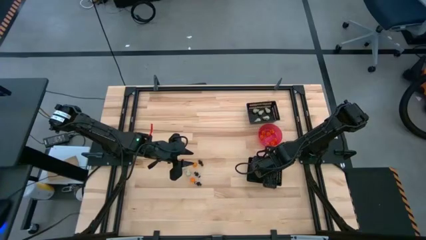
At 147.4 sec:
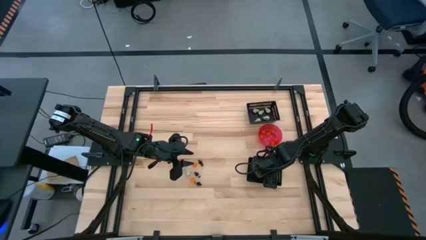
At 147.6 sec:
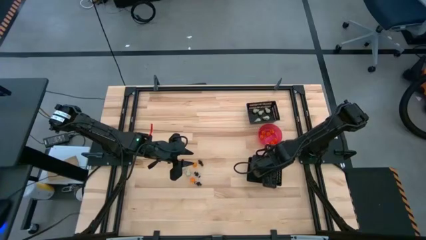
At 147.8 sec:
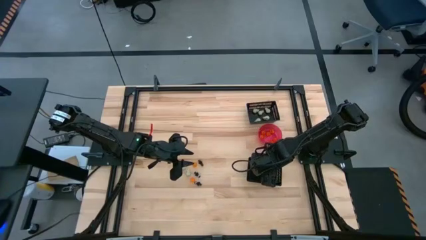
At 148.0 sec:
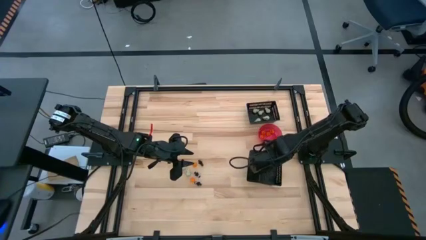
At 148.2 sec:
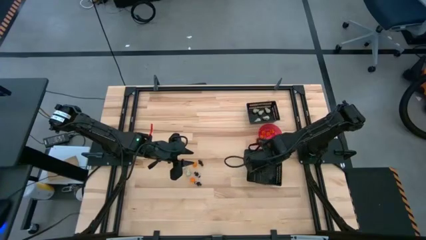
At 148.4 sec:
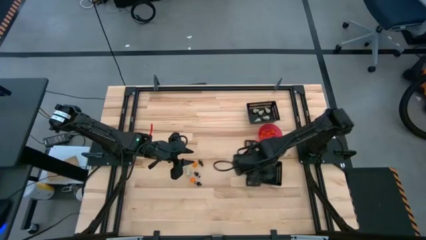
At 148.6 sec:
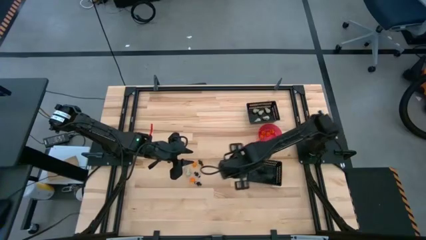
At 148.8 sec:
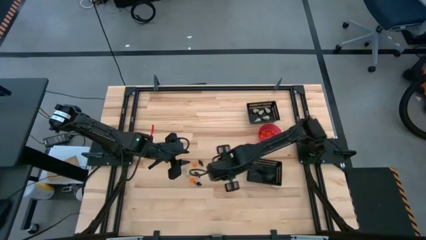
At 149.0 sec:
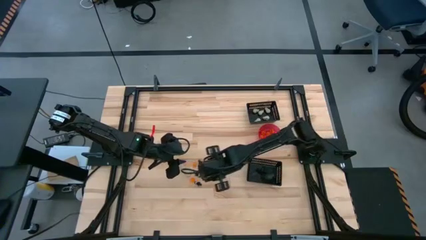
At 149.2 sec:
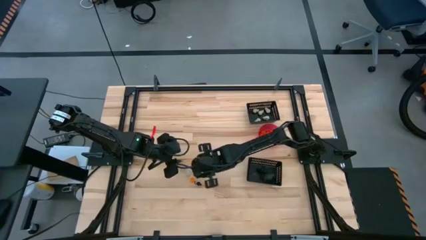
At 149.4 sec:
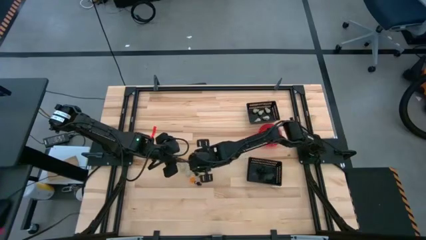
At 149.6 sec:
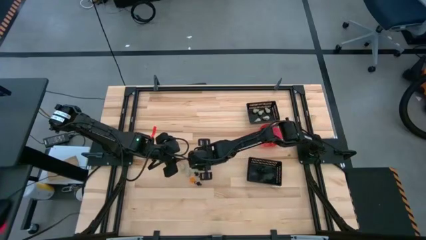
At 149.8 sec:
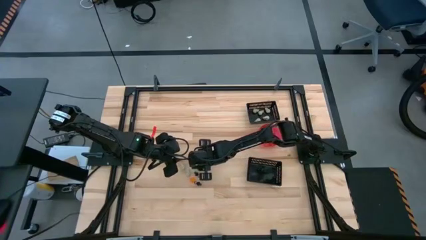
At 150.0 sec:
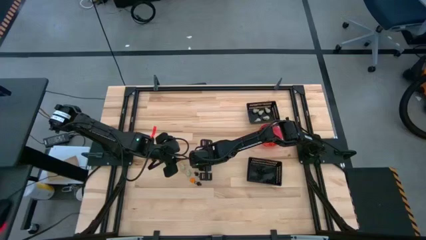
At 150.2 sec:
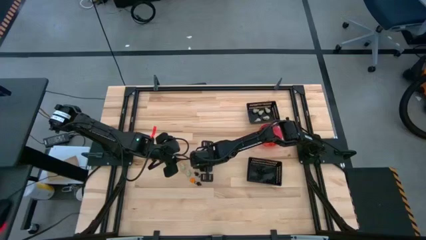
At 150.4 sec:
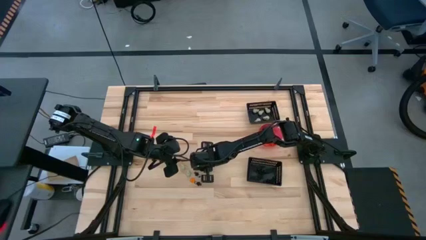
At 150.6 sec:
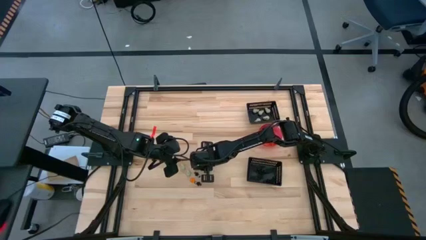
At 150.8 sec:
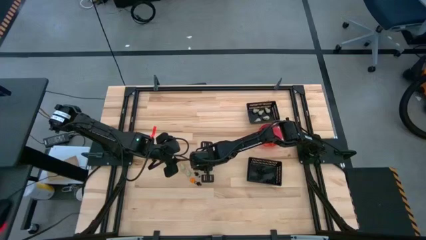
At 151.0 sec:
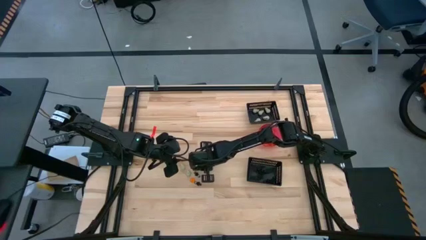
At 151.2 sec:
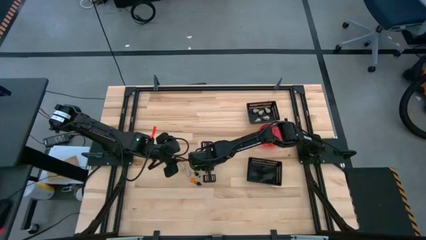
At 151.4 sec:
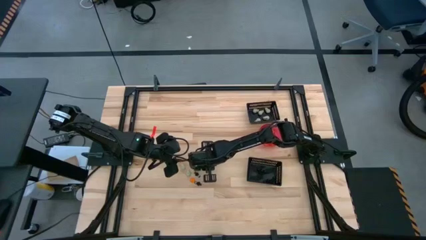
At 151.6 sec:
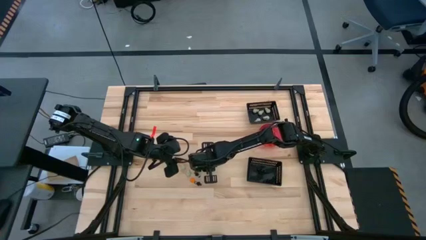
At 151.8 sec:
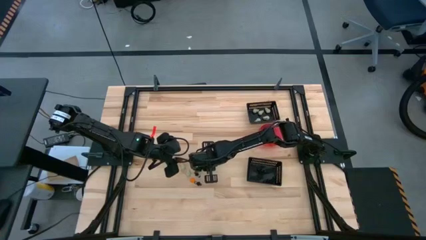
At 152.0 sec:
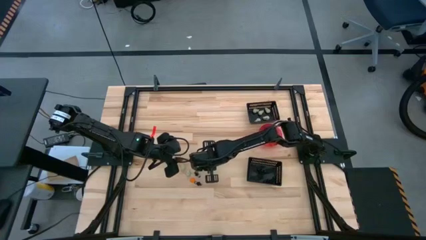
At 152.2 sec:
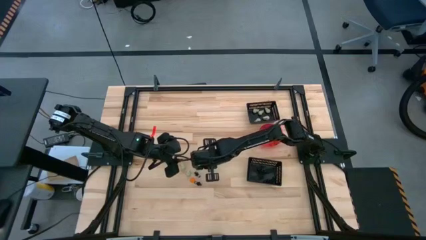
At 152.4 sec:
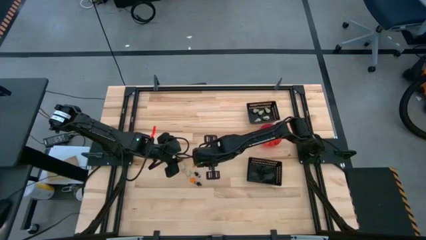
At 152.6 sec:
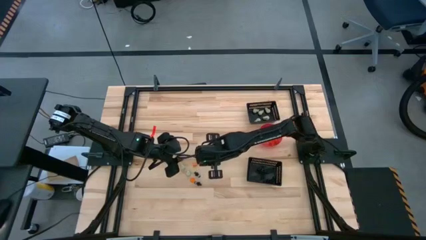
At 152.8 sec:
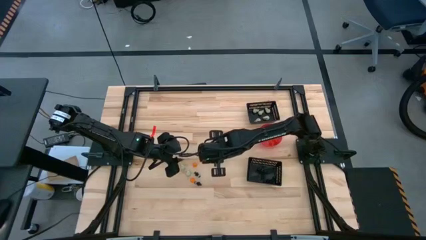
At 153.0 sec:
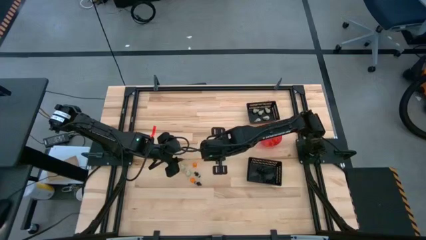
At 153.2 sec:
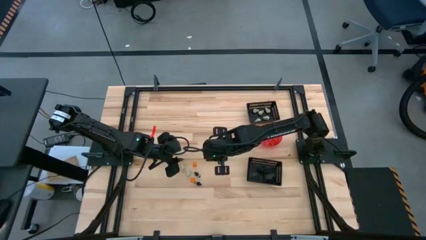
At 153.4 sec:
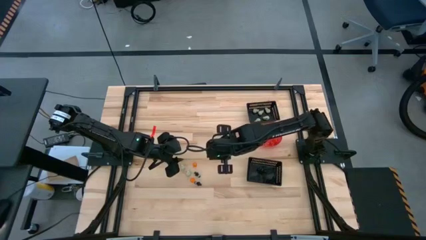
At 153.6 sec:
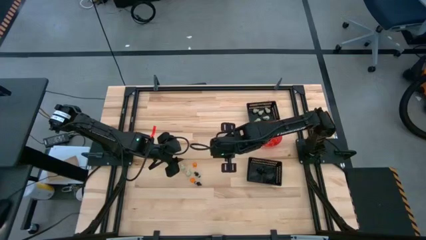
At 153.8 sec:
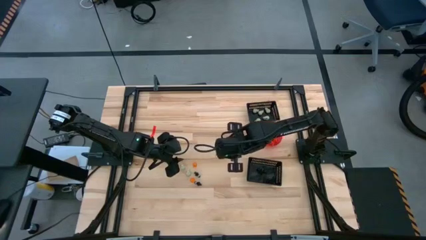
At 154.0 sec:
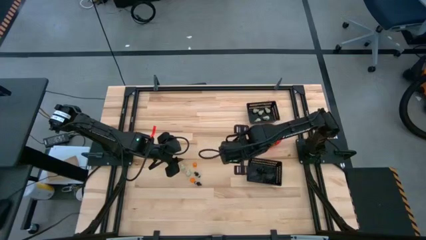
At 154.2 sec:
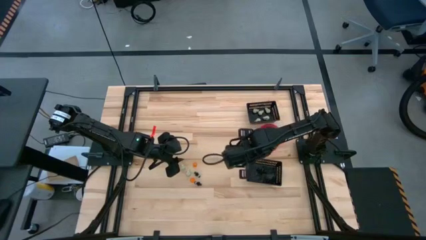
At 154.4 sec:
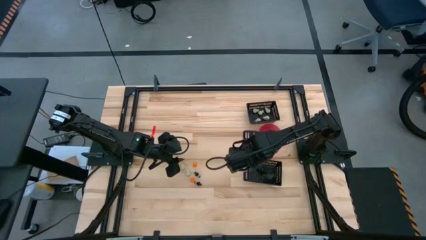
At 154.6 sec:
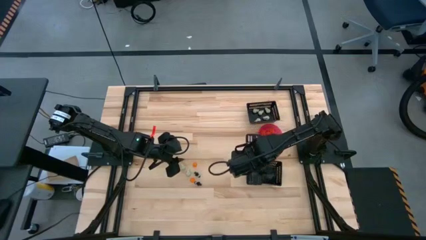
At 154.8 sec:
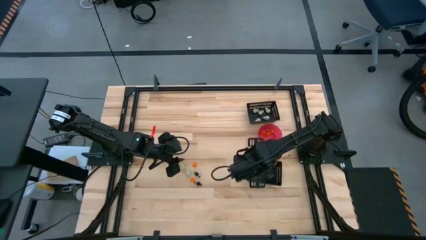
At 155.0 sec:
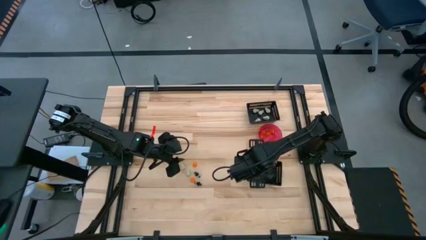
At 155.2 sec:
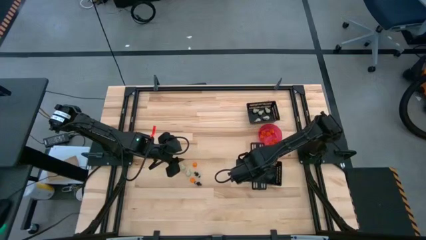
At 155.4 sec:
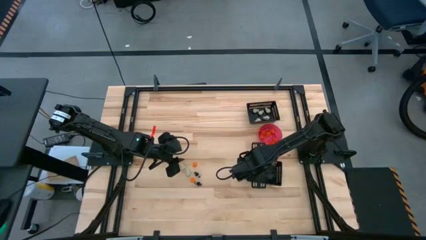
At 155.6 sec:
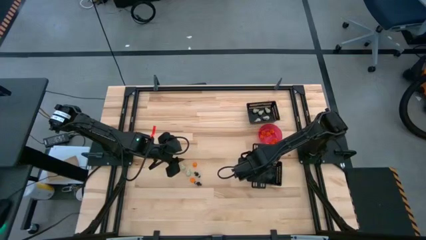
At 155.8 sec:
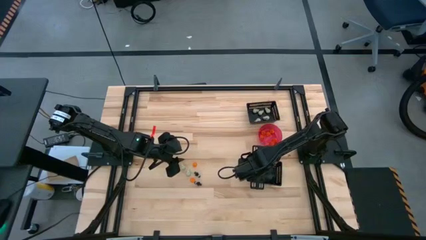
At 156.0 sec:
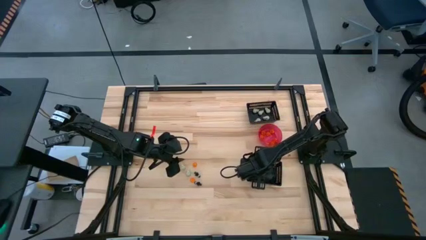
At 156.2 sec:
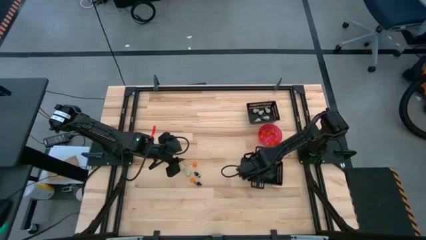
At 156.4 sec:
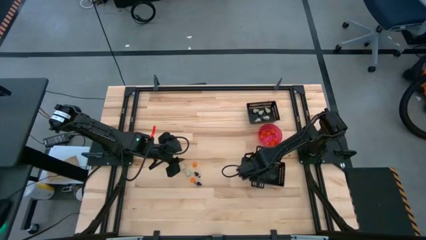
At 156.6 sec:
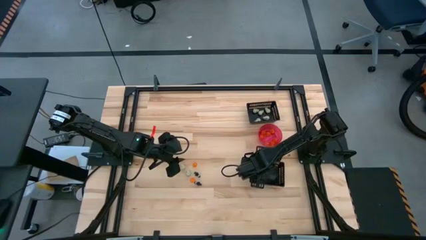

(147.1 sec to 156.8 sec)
Task: Sort Halloween decoration
Put the black skeleton toy into the bottom black bin

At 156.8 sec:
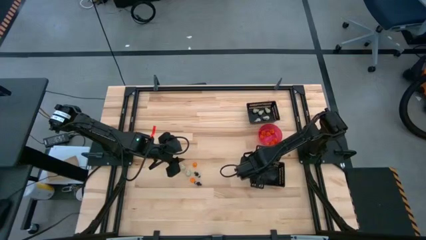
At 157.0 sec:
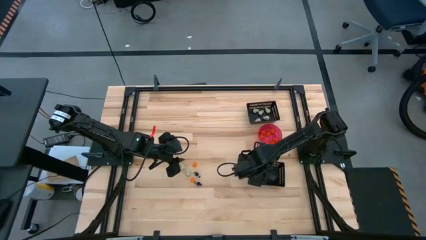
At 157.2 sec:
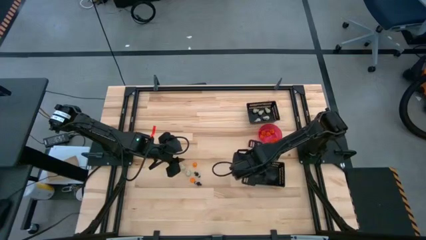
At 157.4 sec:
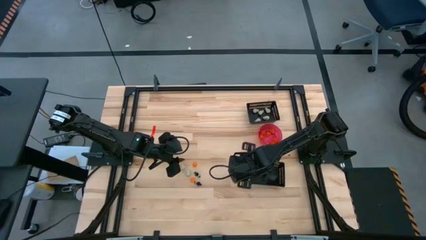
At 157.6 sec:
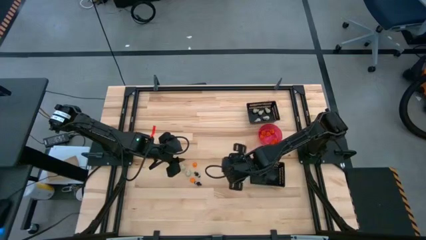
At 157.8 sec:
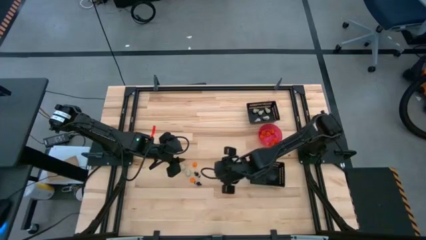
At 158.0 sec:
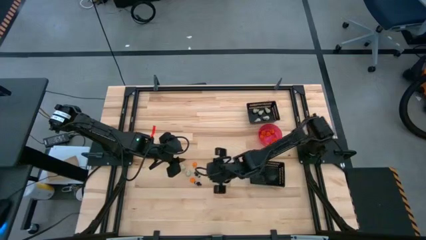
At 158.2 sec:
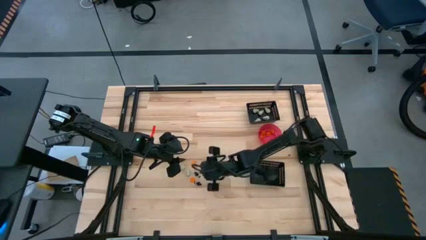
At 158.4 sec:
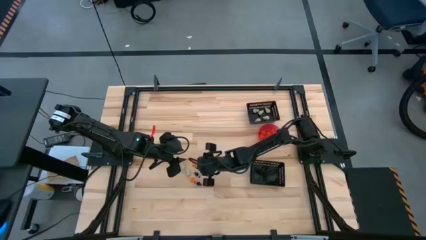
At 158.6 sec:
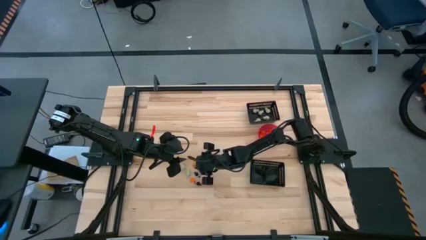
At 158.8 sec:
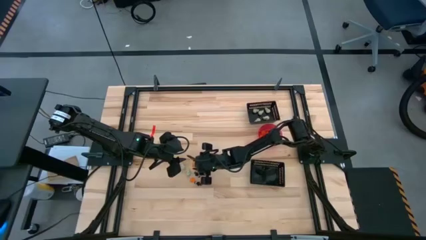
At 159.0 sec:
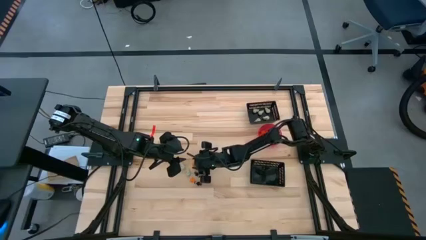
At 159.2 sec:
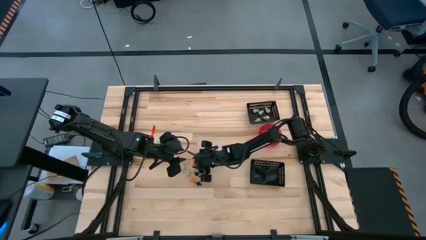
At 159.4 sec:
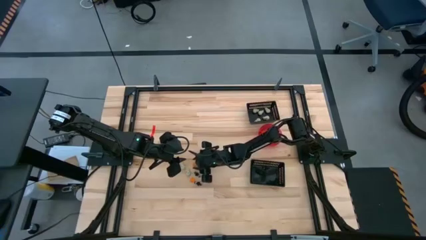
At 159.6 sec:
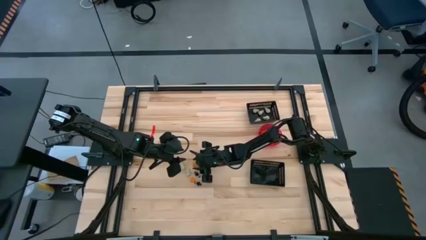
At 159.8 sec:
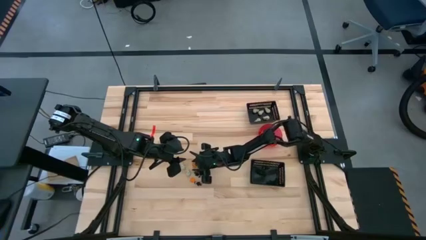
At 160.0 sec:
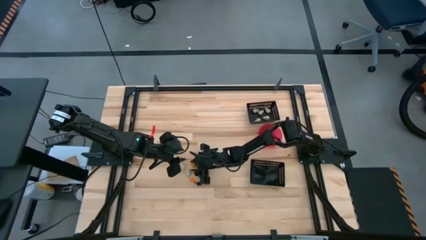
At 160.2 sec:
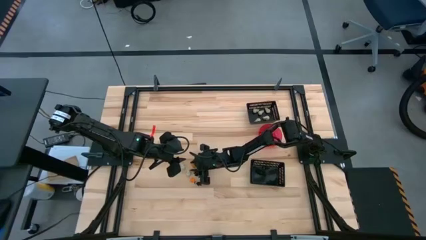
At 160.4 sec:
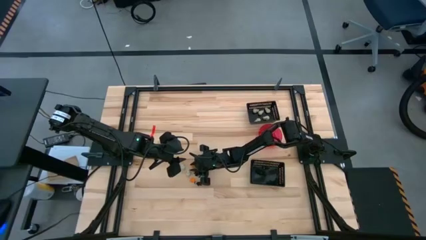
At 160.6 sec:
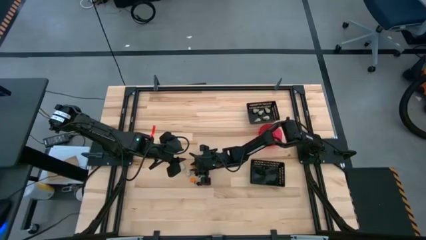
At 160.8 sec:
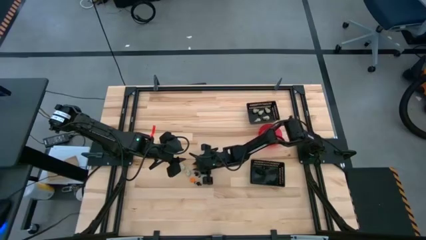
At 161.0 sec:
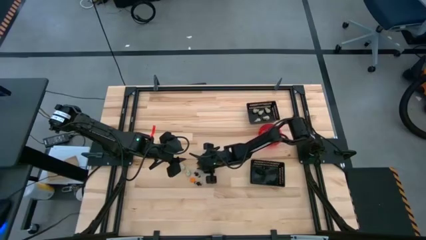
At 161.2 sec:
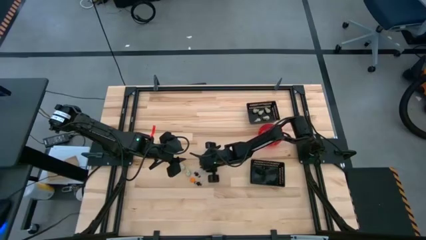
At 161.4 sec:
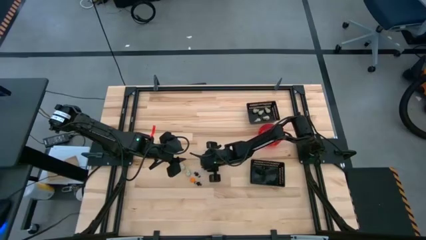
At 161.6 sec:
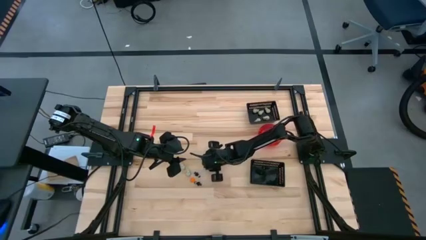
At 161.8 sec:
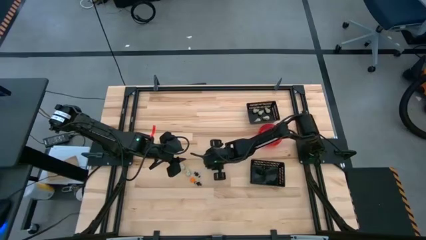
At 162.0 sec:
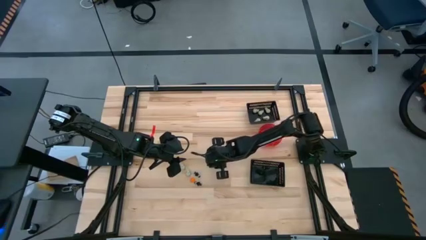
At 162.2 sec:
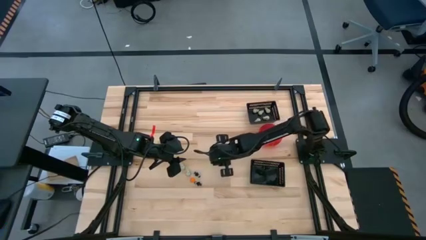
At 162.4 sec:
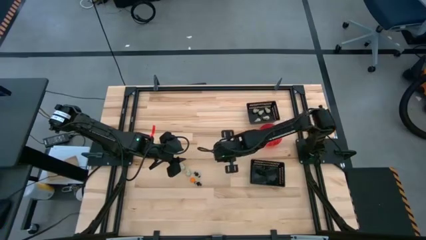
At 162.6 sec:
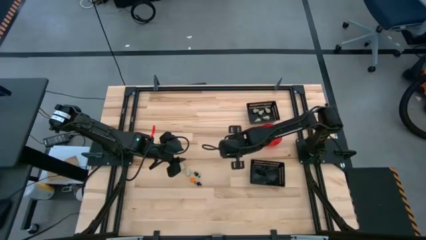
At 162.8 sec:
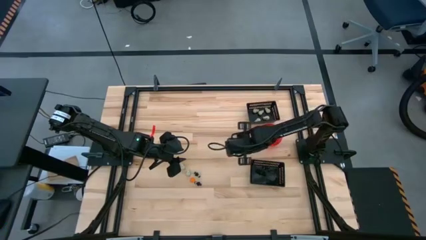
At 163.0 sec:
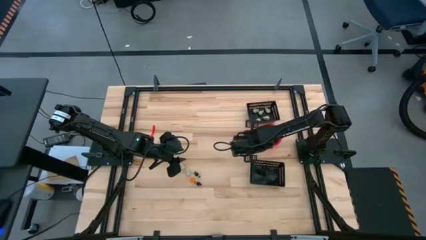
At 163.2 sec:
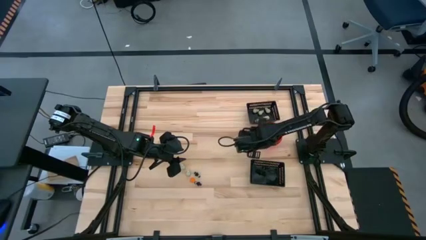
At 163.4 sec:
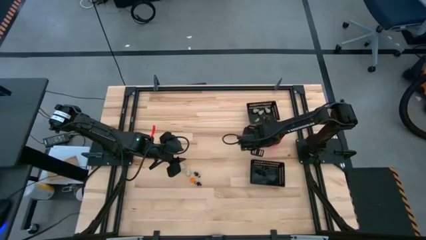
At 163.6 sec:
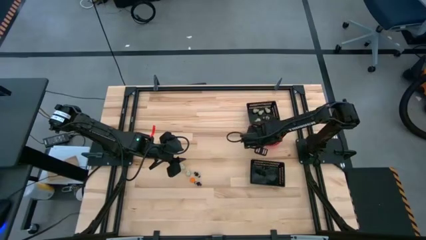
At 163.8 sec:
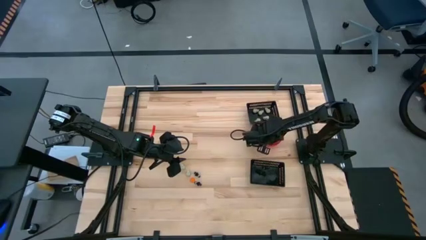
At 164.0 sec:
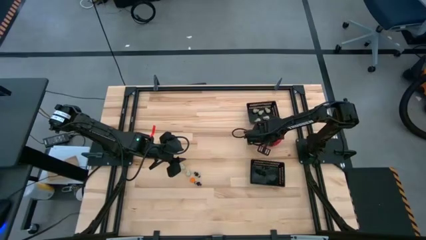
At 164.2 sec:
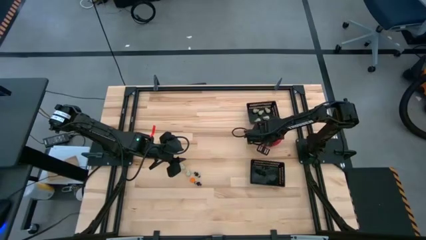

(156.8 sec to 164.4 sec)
Put the orange pumpkin toy into the pink bowl
